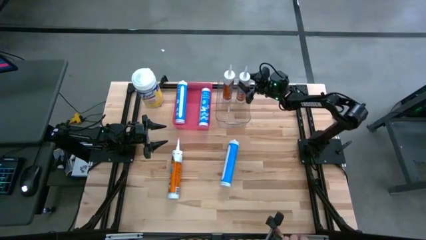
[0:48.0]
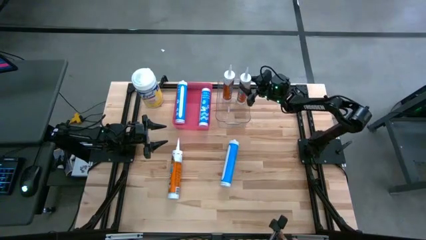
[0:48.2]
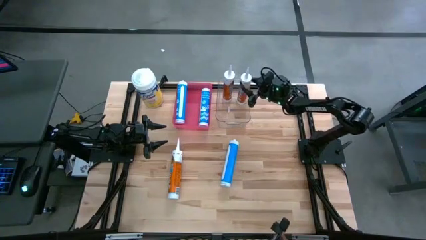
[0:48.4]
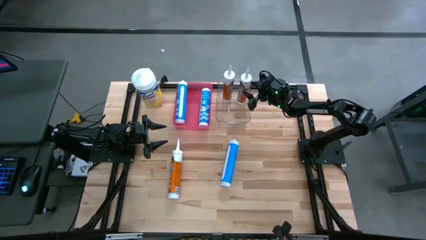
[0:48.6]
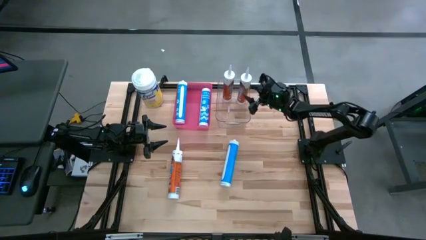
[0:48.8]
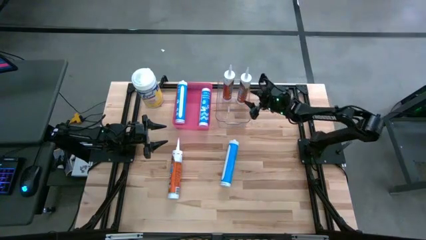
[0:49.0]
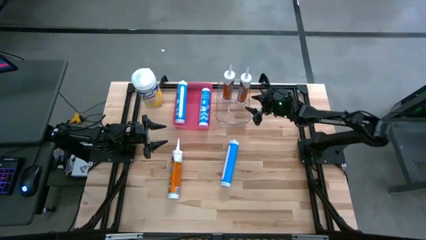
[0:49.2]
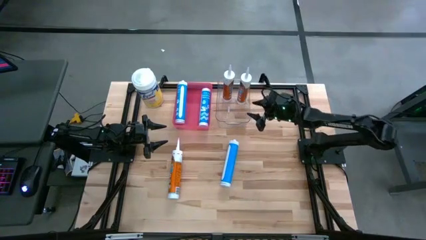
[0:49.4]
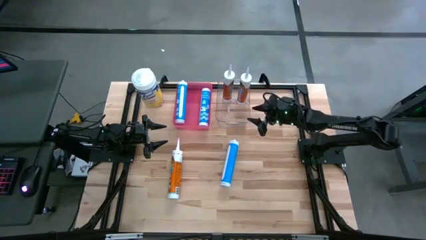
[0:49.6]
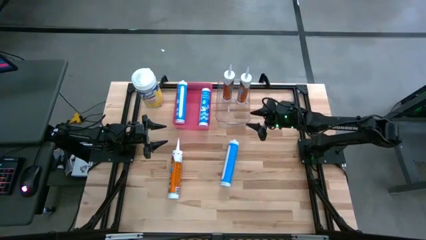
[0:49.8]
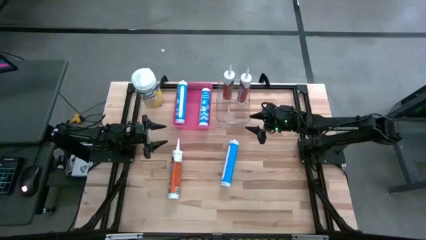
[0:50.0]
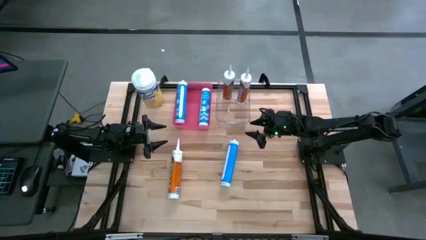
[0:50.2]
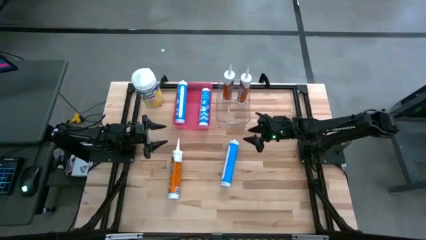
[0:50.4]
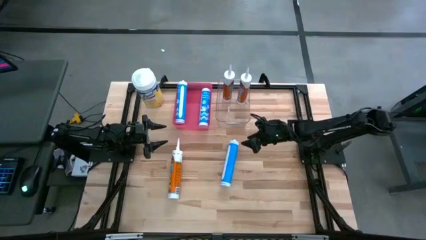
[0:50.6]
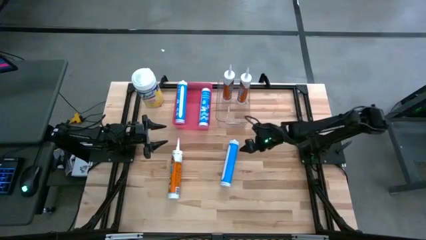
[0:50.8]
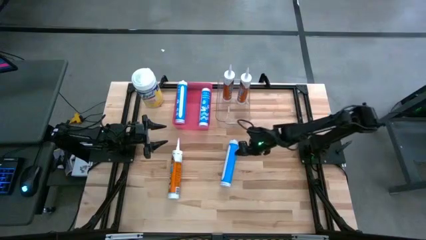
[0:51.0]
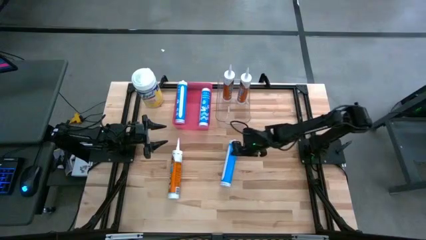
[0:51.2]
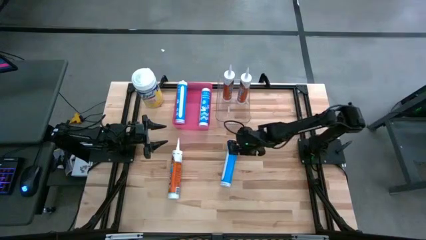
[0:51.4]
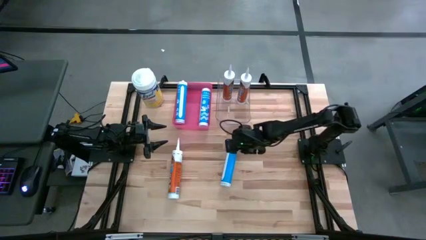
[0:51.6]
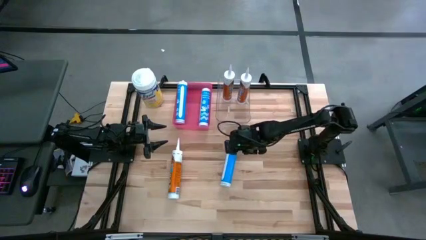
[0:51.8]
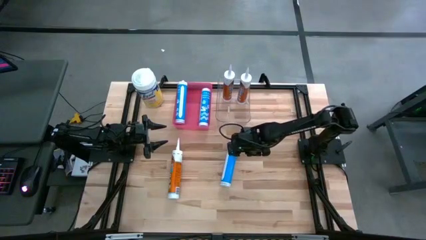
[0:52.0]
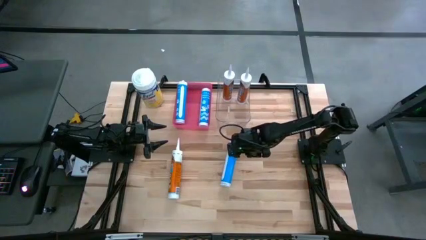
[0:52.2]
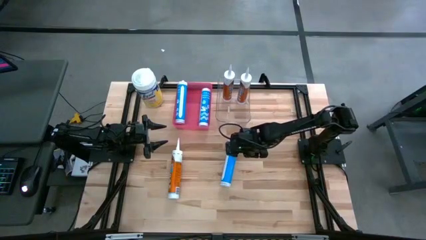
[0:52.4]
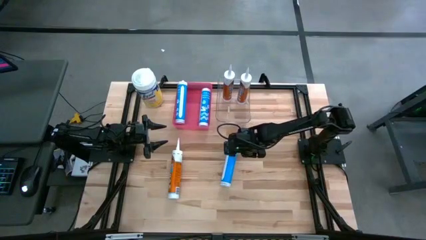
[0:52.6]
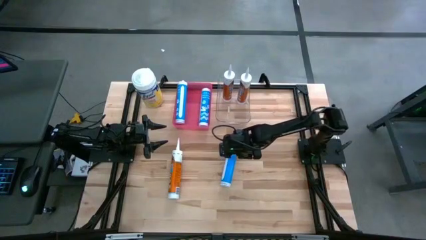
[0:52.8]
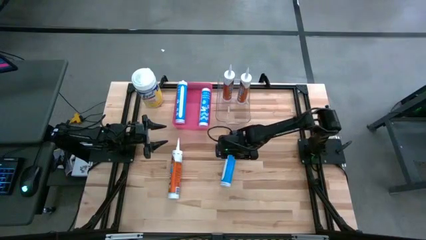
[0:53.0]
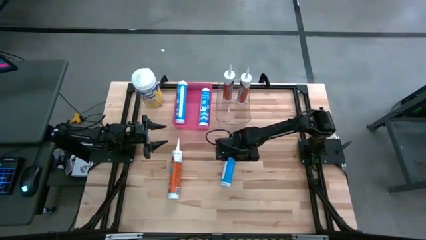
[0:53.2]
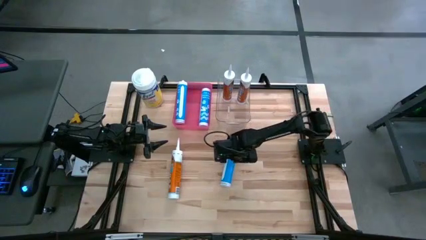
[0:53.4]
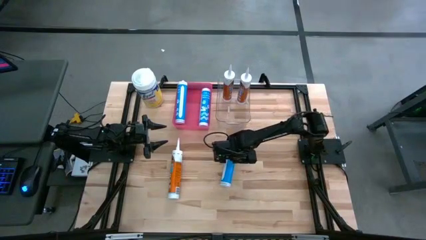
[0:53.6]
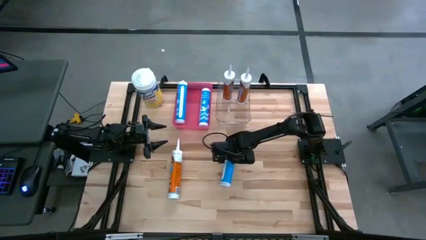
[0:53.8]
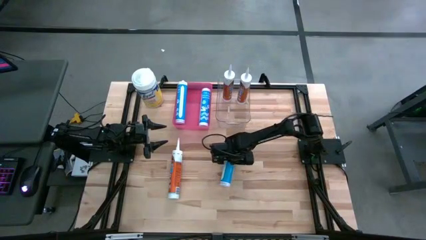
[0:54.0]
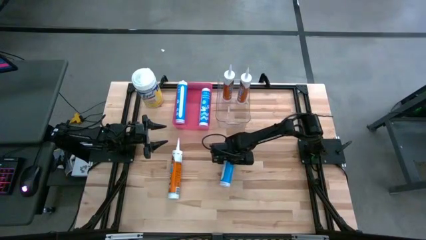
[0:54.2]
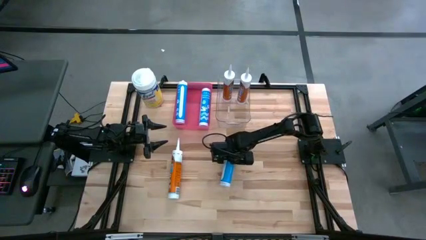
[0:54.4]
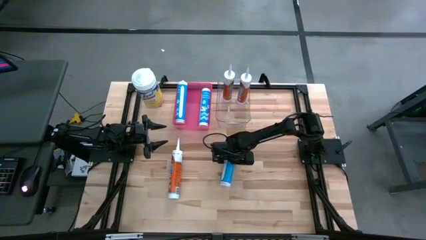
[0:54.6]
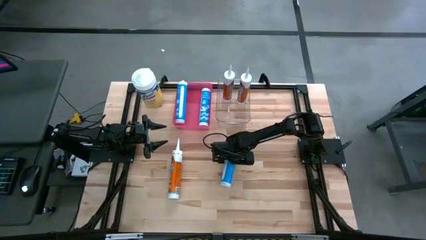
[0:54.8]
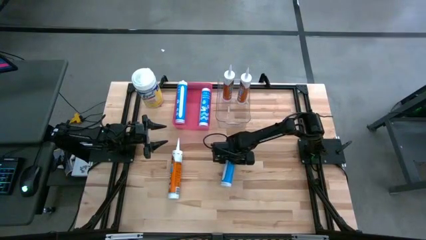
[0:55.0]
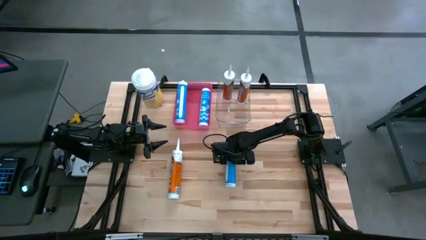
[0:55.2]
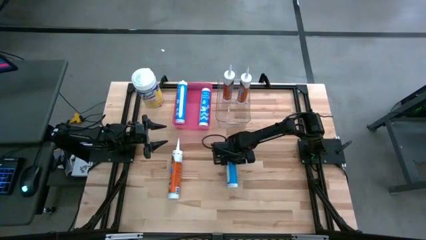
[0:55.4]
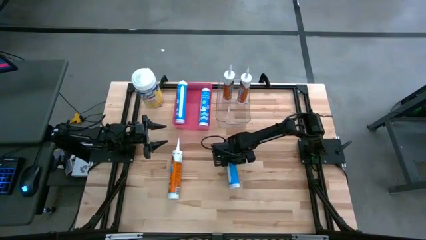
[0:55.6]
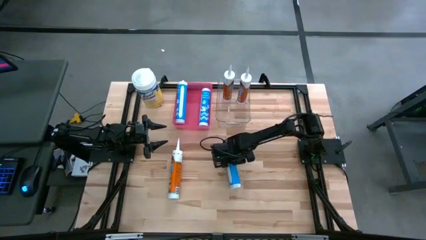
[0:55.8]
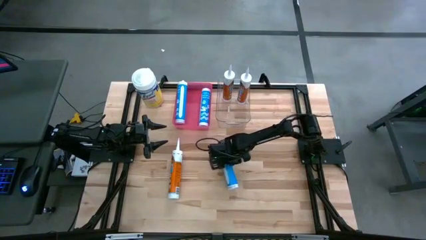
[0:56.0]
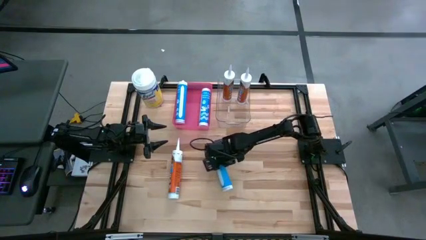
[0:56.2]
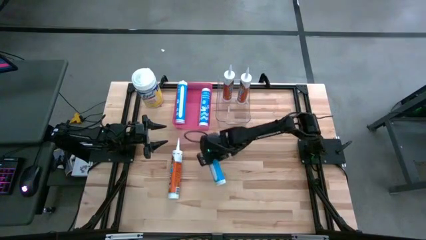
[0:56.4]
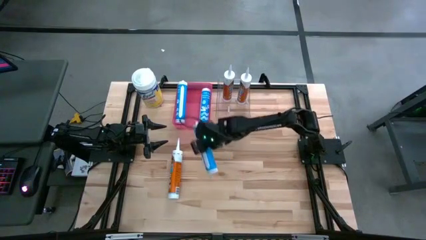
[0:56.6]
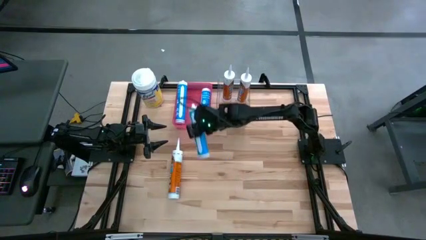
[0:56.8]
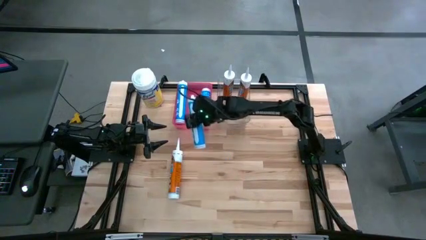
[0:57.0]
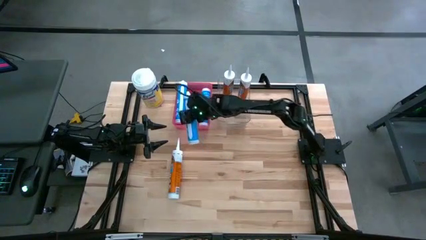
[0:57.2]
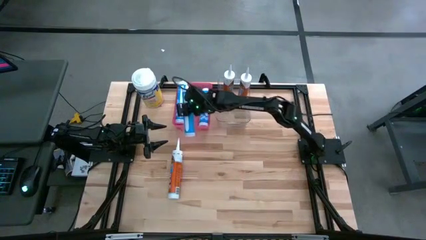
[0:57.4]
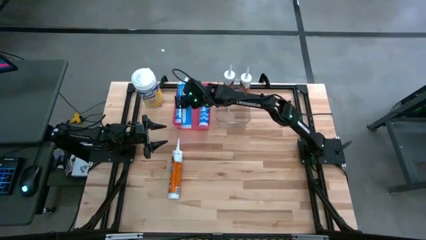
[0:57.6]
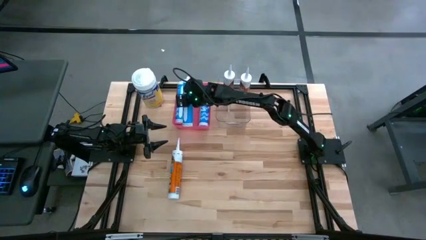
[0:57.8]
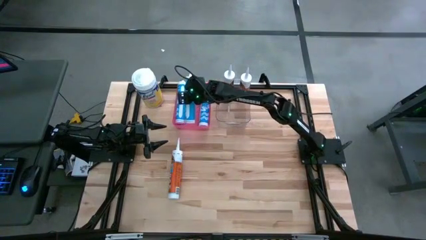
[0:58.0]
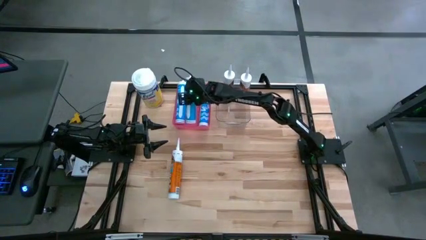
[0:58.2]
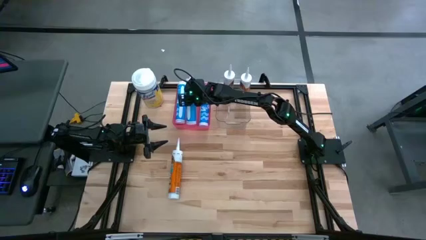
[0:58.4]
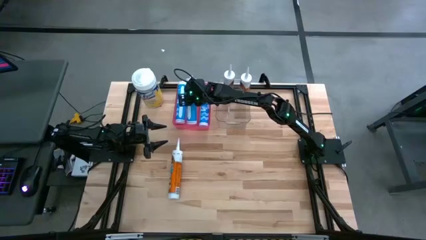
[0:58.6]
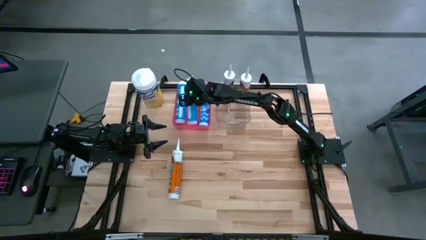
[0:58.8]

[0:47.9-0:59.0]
Task: Sort silicone sealant tubes
Put the blue silicone sealant into the pink bin

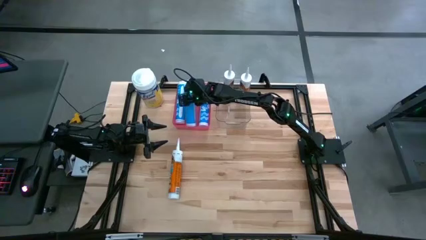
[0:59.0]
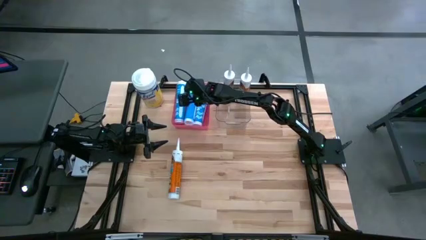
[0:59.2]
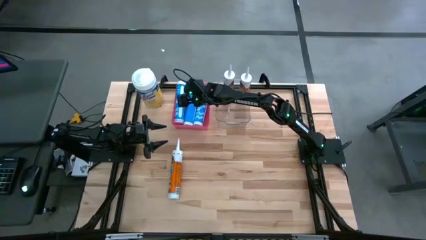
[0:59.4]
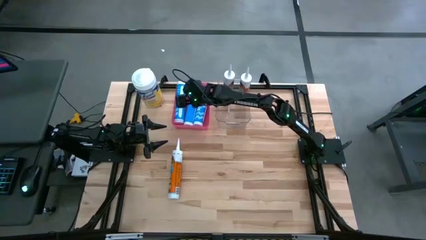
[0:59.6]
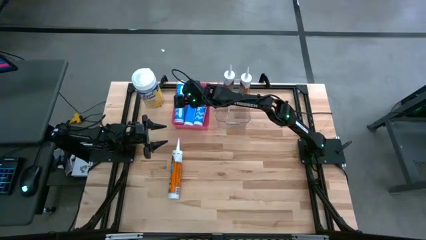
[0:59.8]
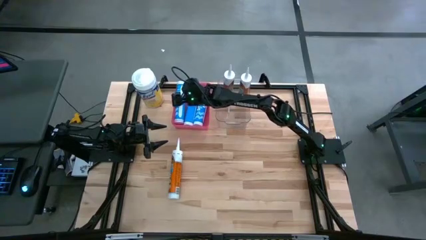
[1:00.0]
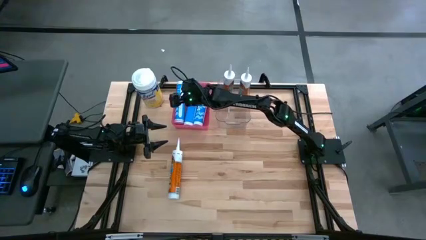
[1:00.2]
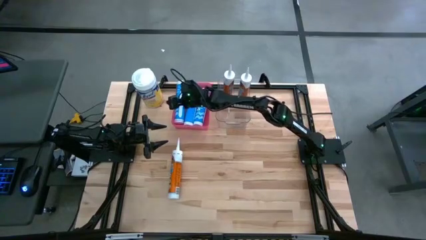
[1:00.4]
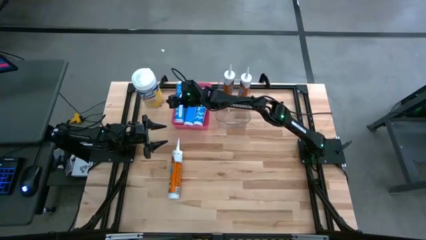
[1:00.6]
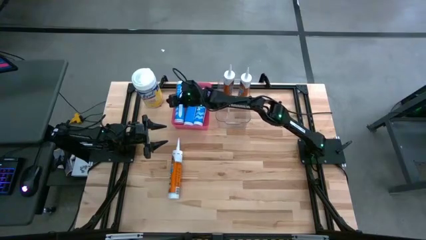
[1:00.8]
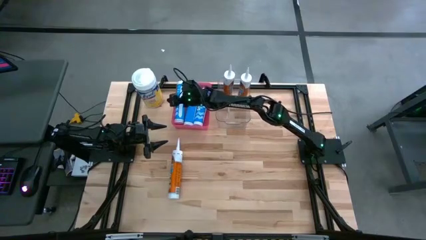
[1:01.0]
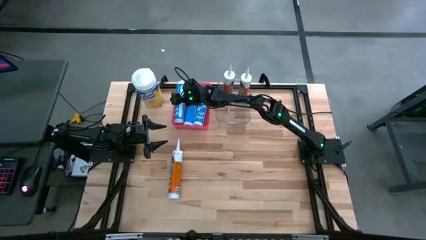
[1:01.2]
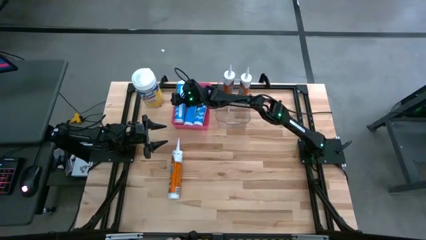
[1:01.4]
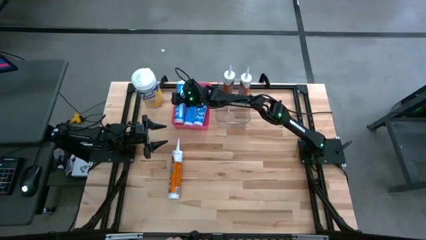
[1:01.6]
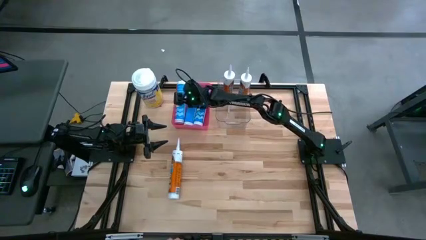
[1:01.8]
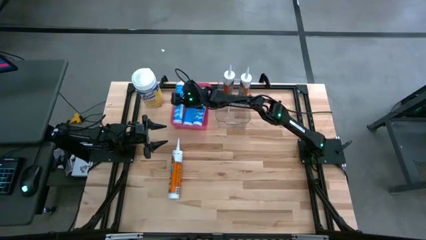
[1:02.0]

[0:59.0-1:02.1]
Adjust the left blue silicone sealant in the red bin to align the position

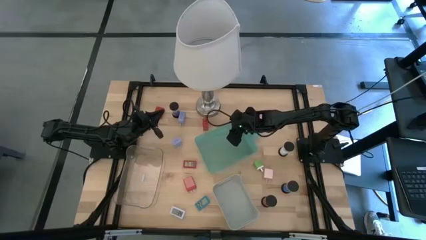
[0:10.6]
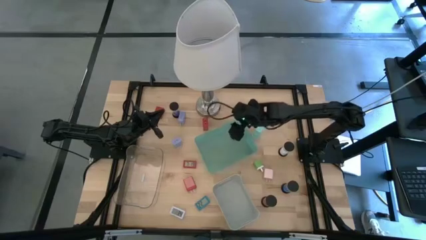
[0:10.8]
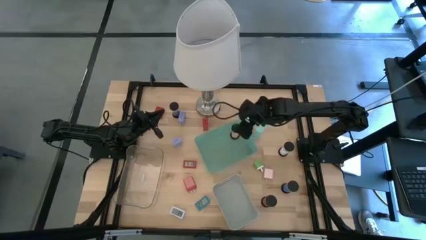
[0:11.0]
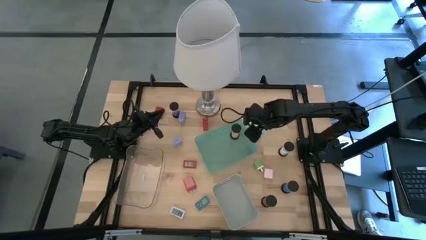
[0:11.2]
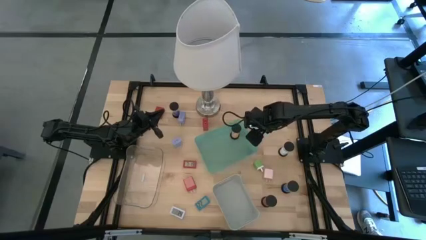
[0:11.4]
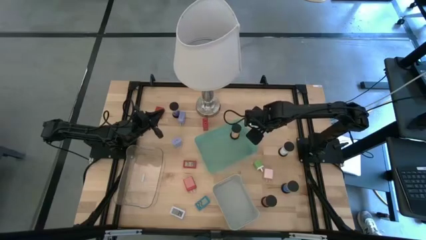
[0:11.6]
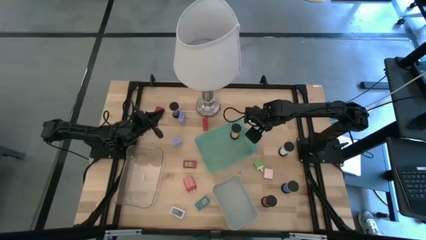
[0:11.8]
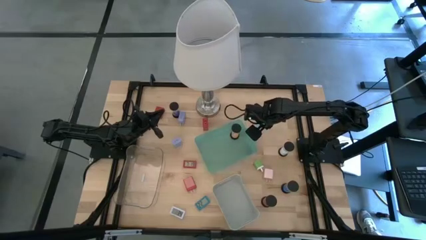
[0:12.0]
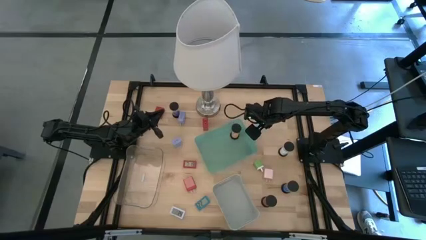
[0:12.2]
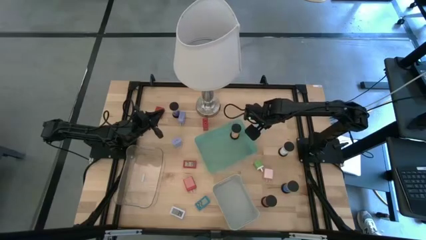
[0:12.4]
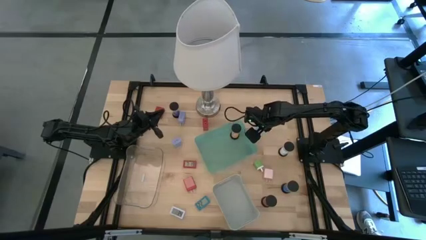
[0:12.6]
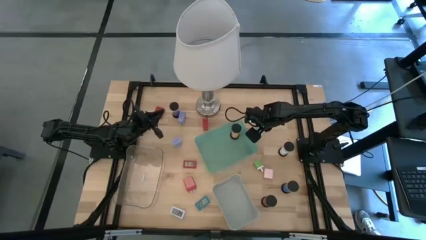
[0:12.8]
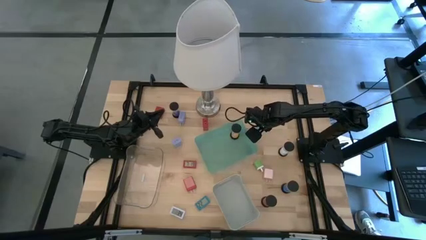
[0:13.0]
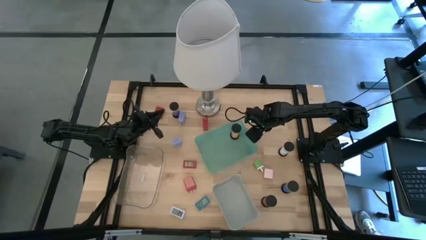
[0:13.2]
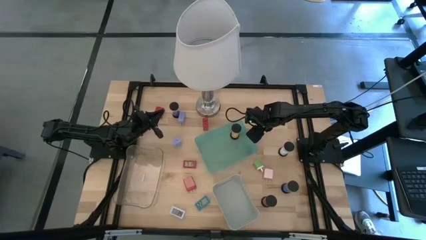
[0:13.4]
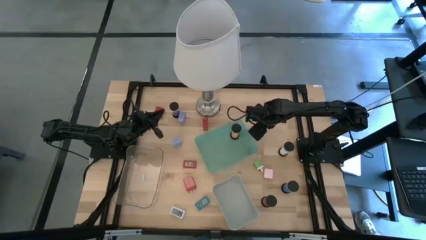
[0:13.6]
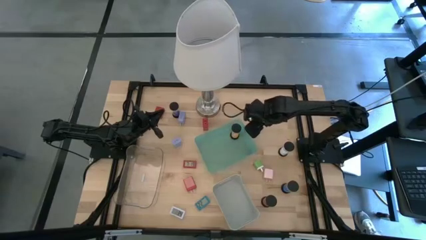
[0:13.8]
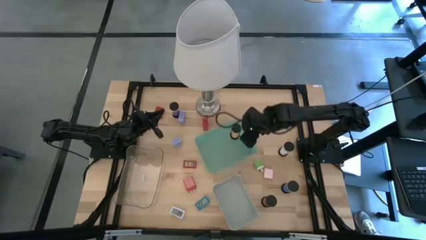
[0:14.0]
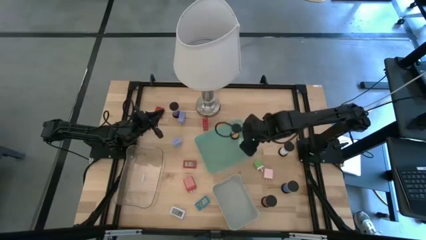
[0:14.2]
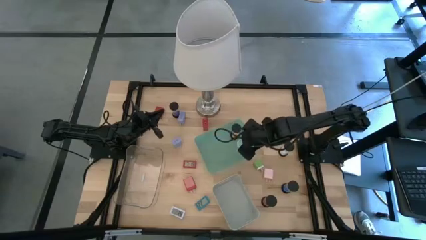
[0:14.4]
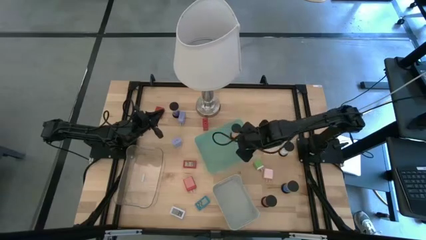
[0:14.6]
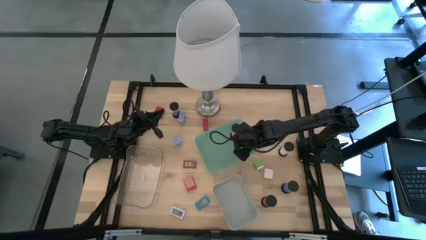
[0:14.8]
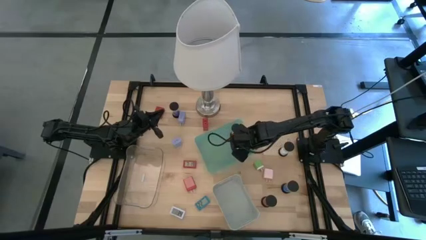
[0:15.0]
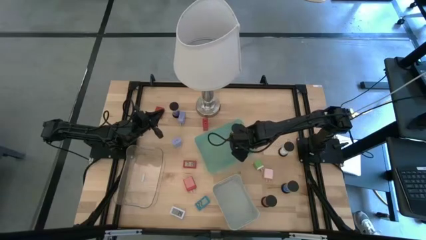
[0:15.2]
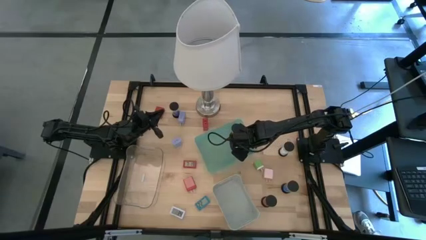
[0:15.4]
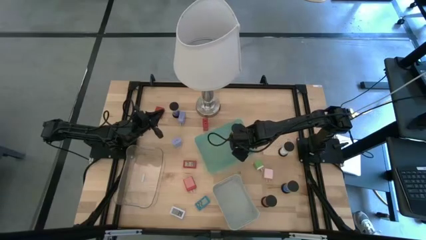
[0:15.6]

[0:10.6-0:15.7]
Task: Pick & Place Office items
Put the light blue hourglass into the green bin
